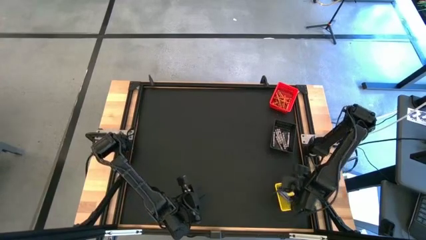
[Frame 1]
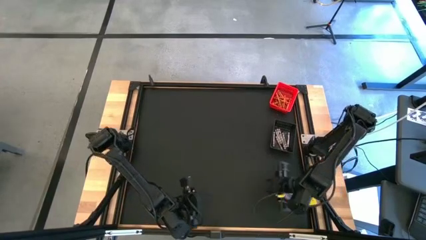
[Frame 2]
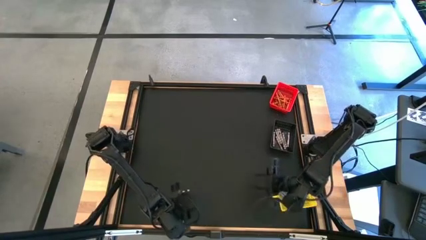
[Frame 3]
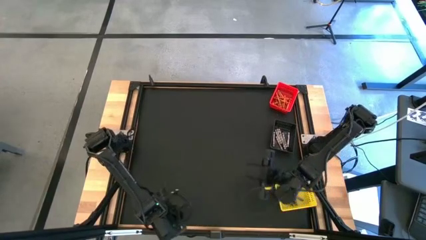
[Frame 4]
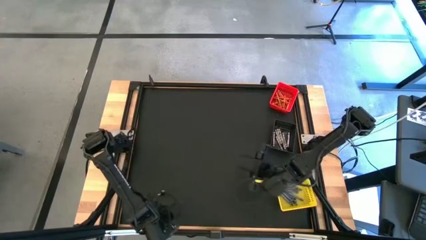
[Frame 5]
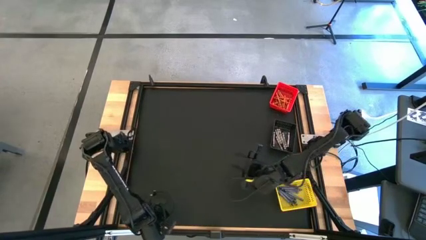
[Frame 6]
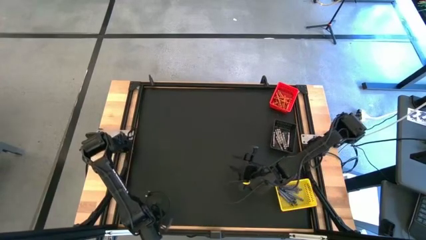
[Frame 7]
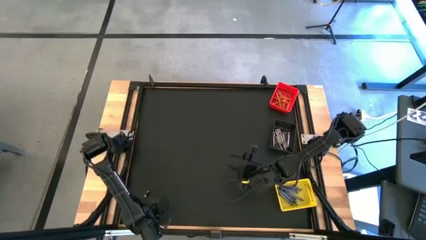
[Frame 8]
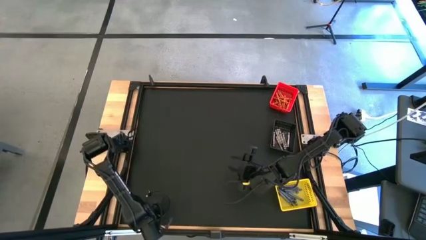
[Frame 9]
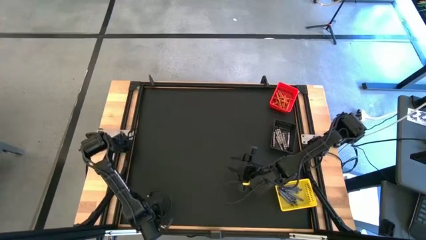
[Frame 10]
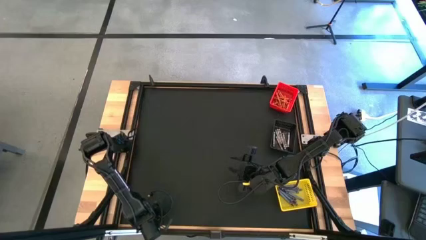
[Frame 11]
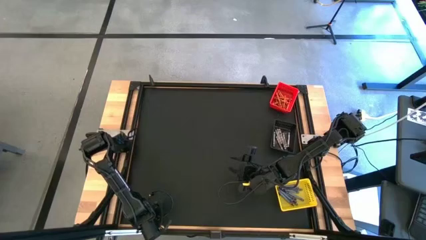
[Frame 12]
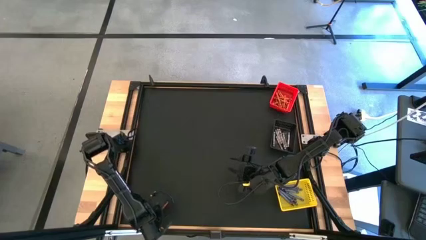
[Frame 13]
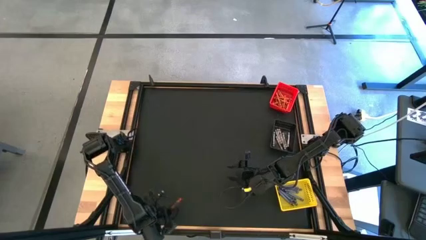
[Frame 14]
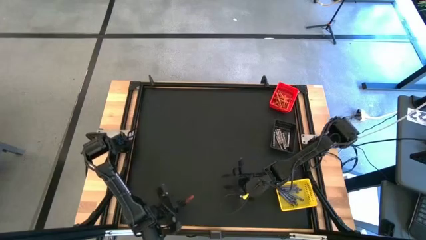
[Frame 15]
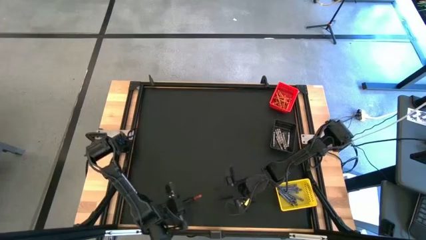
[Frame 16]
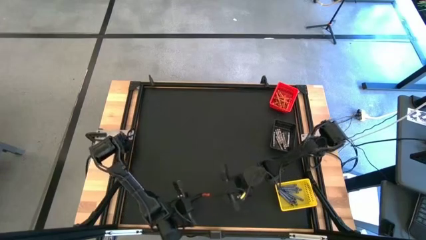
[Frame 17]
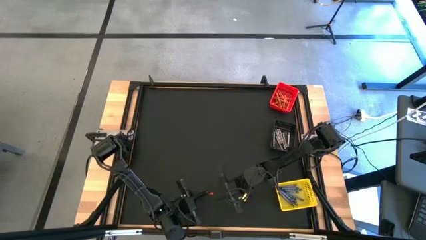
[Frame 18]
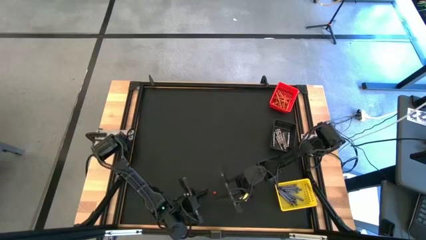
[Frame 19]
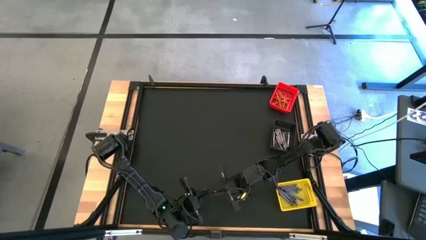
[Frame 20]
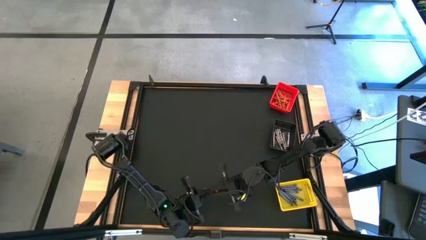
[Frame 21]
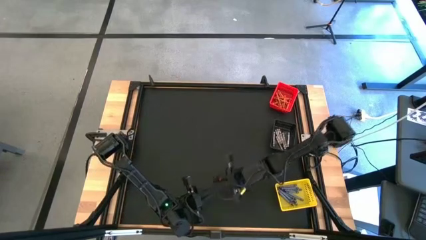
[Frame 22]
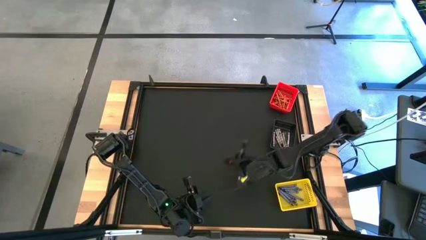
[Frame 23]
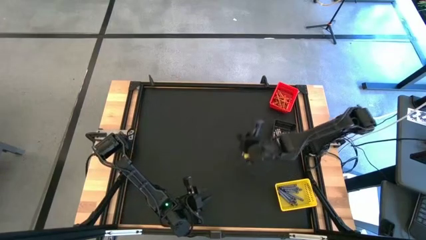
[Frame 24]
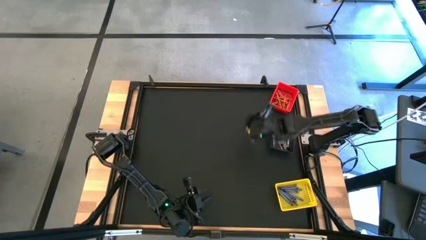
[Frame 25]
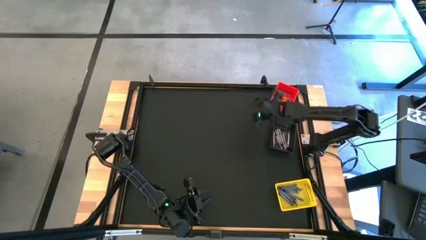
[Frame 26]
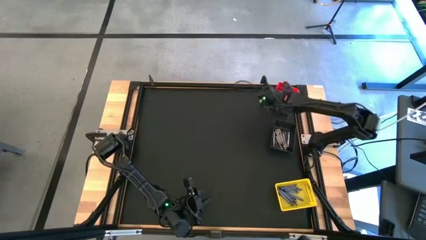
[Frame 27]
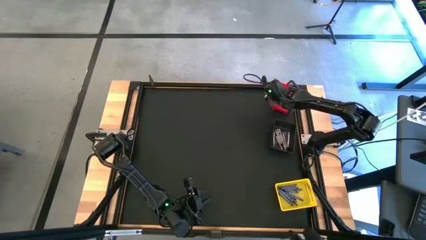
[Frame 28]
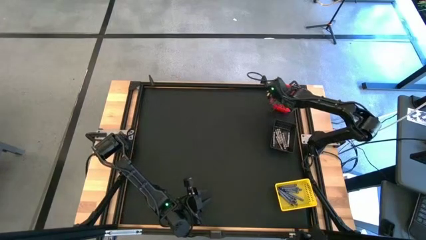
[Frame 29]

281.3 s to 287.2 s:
Task: Sort crayons
Put the orange crayon into the red bin

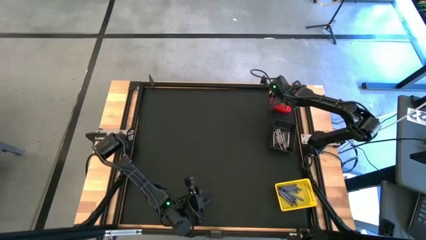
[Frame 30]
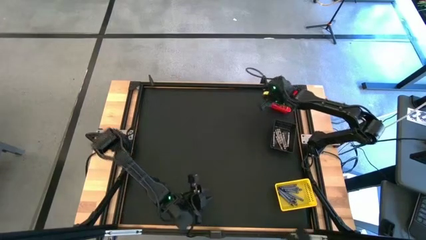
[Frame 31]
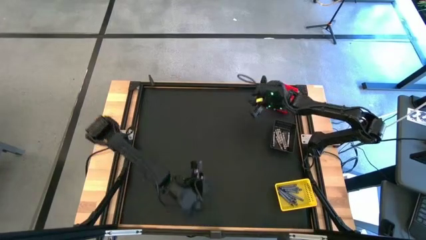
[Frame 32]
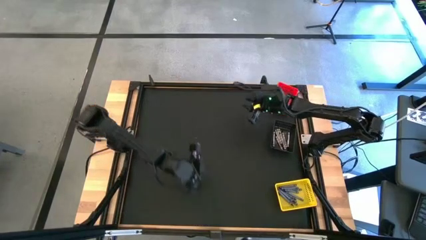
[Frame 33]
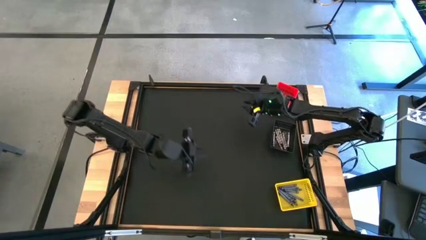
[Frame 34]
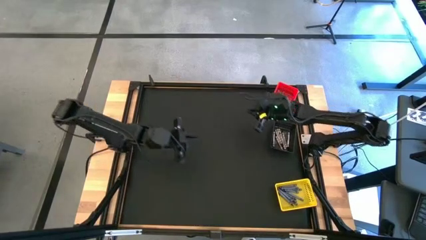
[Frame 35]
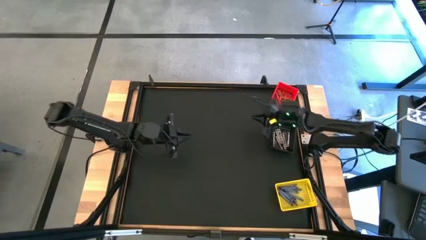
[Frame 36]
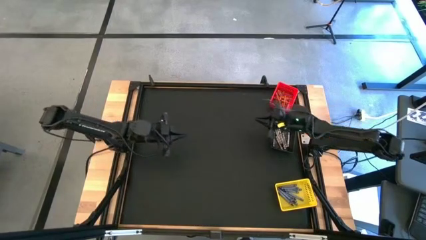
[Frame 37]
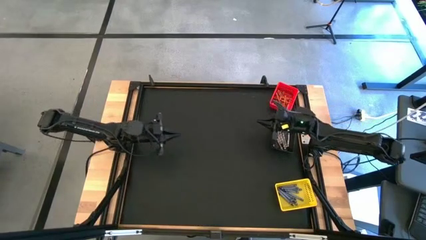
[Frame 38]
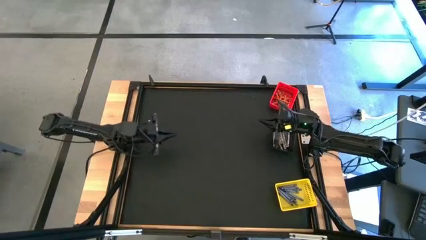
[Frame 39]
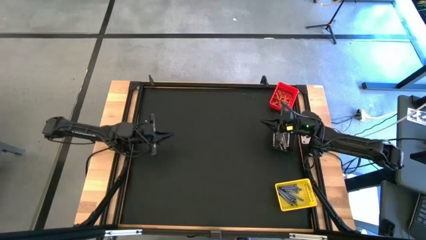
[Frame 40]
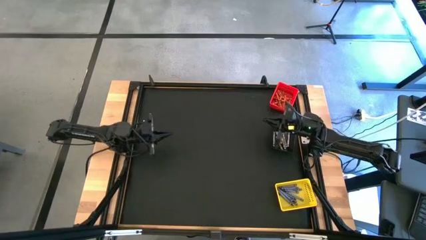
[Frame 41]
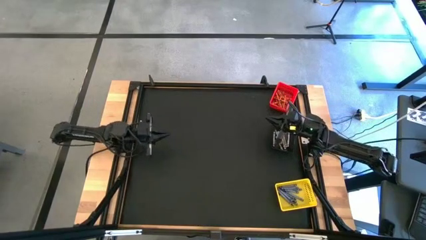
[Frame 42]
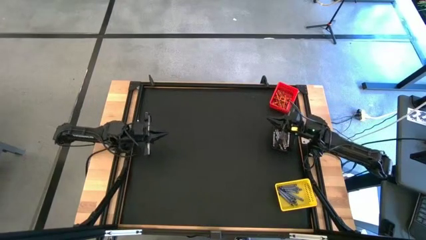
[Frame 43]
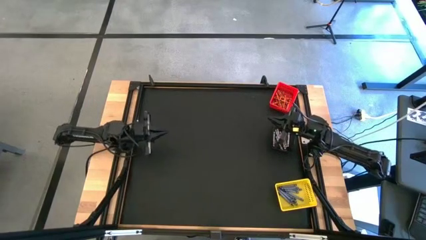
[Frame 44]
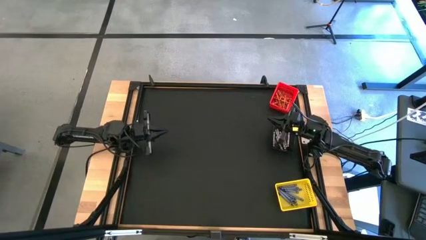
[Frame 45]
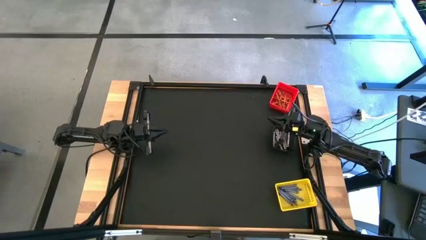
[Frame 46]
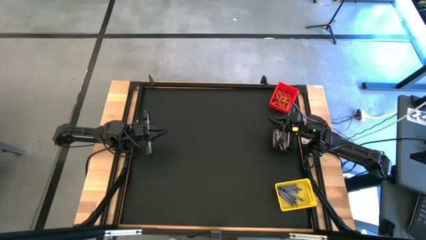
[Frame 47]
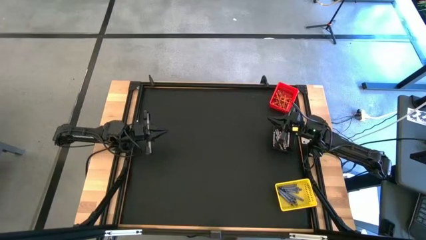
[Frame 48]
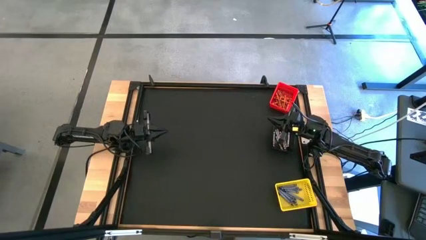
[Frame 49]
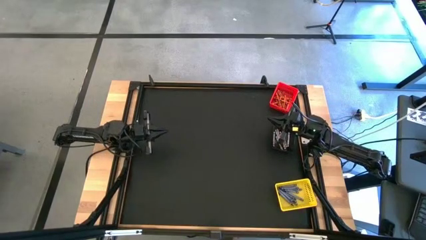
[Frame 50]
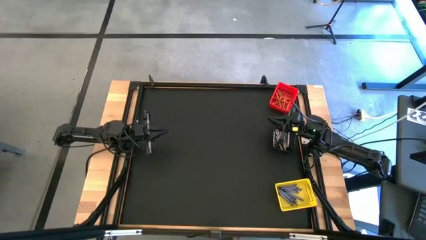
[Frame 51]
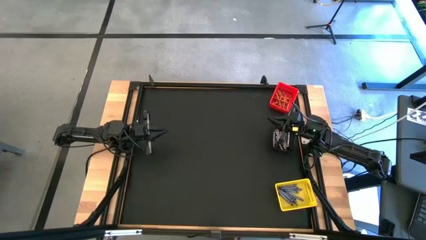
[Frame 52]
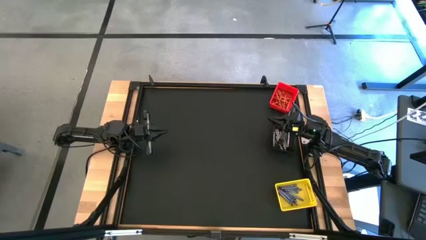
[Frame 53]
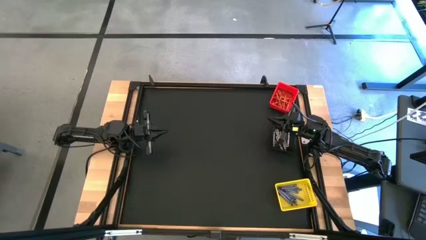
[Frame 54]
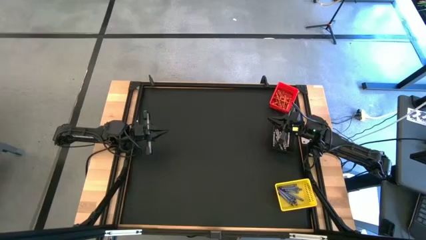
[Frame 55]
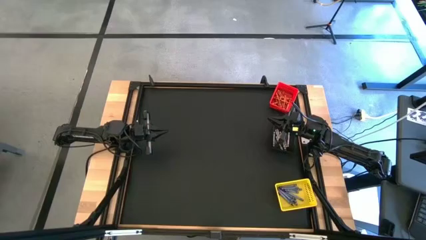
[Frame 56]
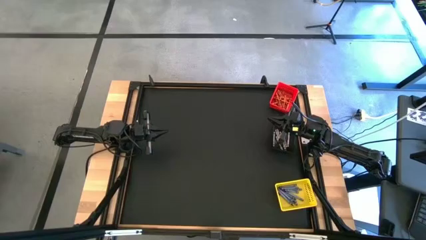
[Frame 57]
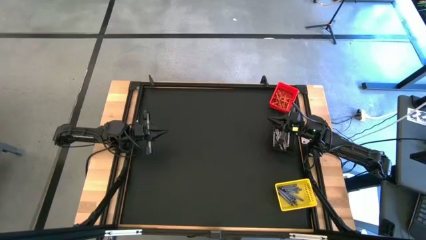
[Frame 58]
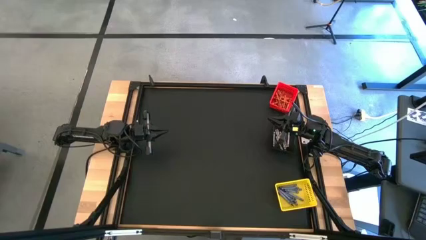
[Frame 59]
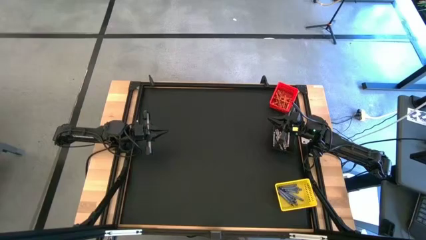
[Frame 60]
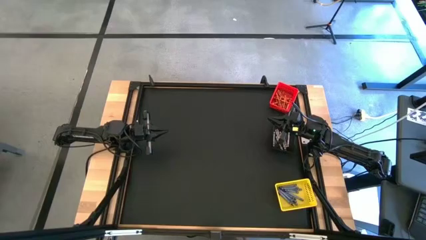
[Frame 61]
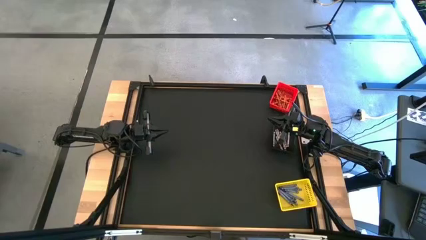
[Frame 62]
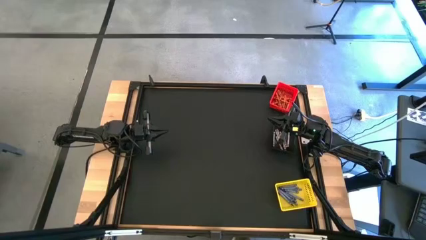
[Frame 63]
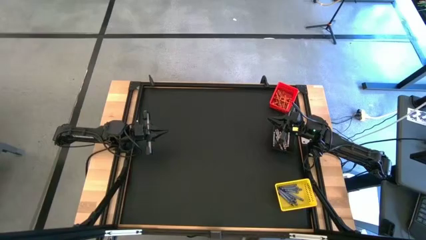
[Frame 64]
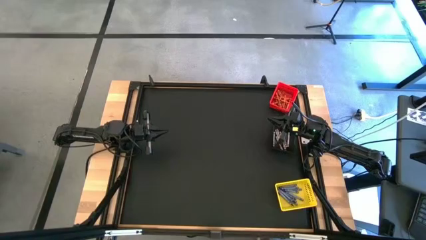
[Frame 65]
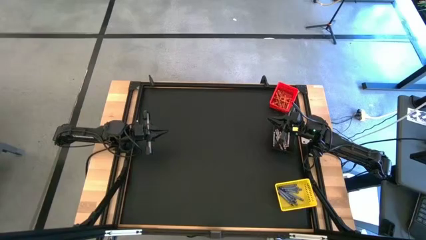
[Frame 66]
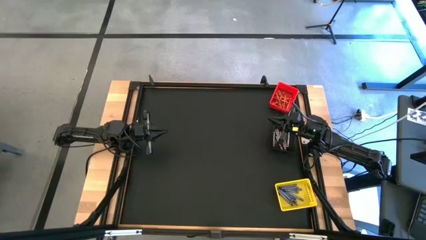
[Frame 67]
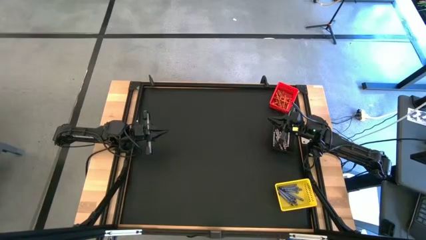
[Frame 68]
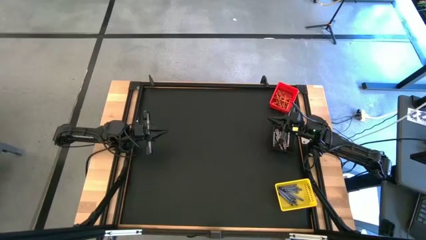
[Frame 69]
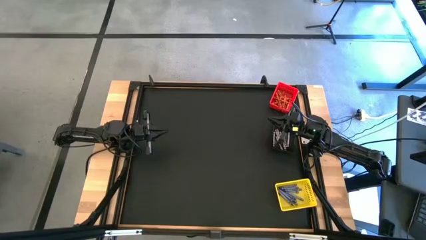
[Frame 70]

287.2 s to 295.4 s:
Return to Home Position

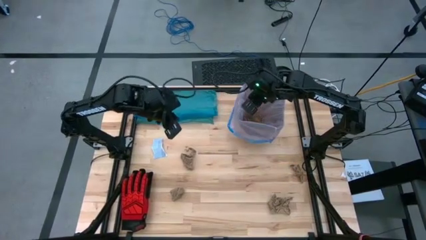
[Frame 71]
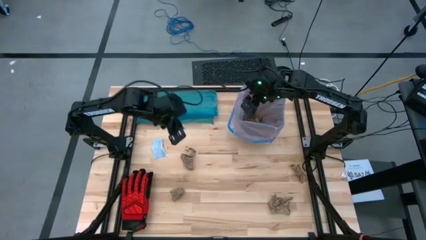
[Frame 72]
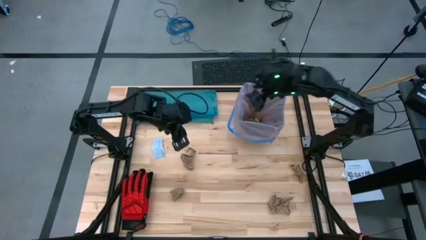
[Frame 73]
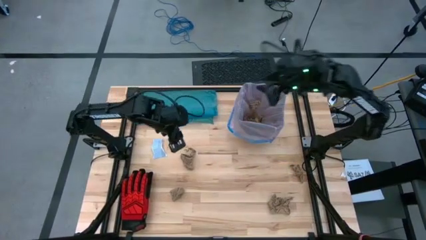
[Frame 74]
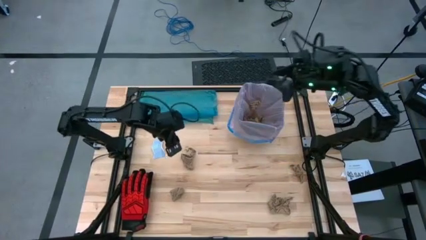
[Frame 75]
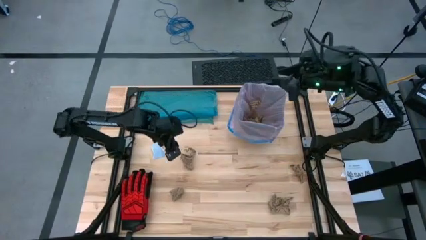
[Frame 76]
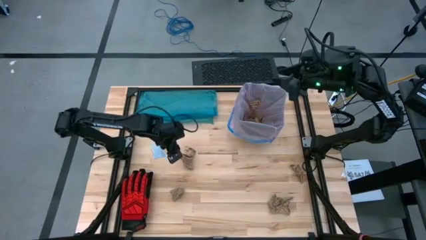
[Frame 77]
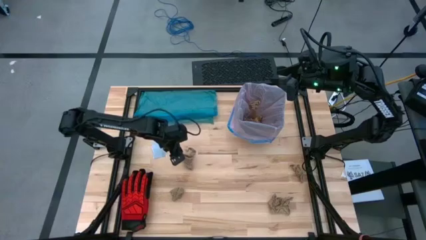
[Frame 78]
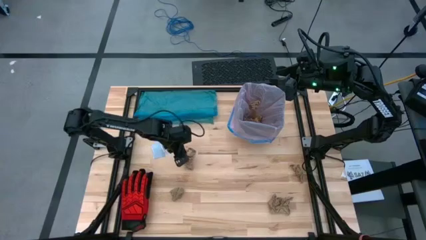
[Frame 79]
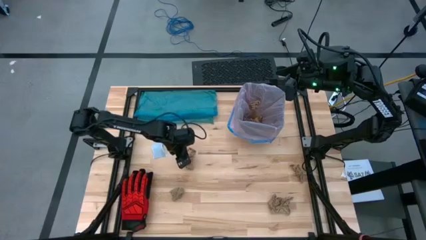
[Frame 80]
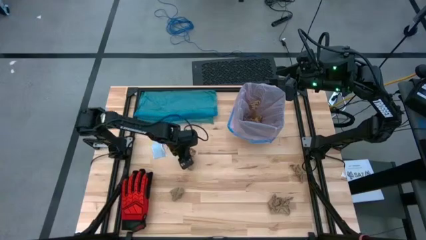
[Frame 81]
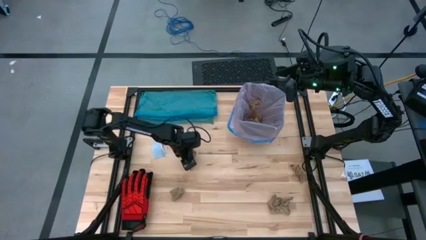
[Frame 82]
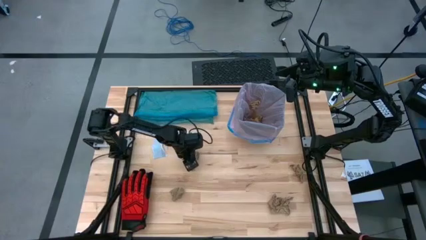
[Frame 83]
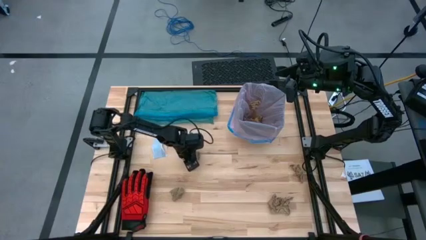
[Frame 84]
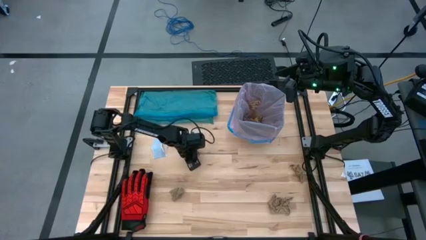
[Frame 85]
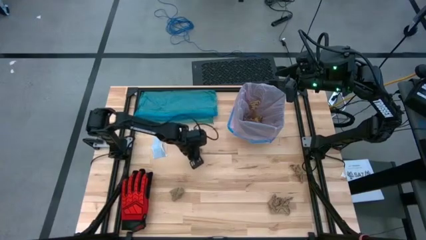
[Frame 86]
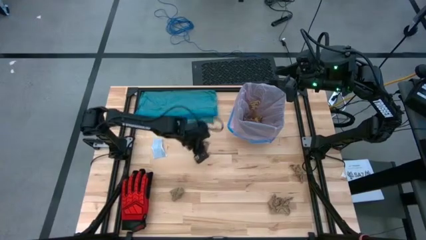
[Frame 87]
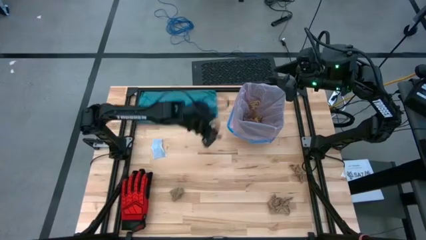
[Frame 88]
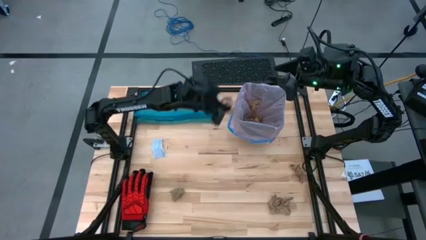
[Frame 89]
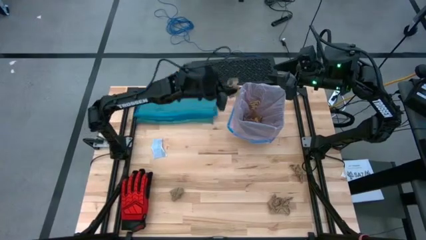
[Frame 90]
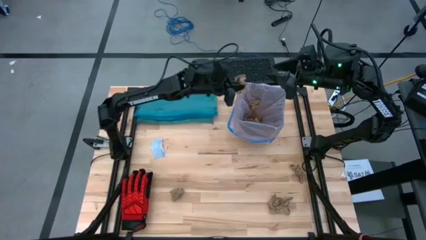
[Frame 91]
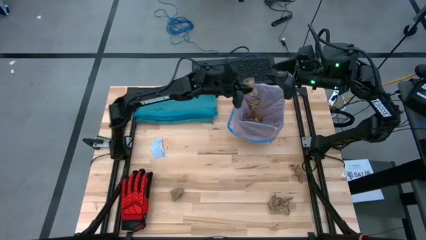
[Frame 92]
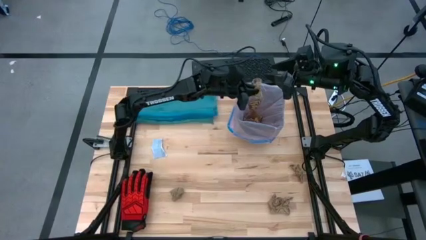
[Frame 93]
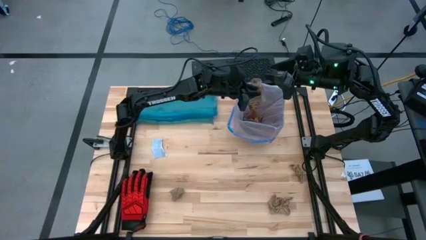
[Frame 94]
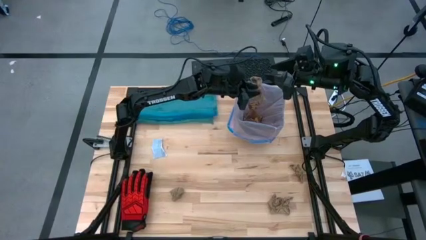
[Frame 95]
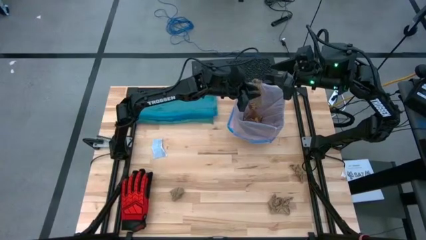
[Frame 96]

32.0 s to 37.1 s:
Task: place trash/remove bag and relplace
Put the brown napkin into the trash bin
